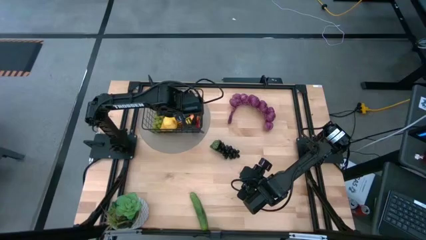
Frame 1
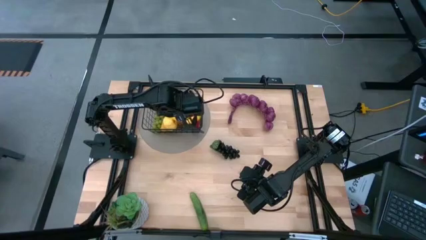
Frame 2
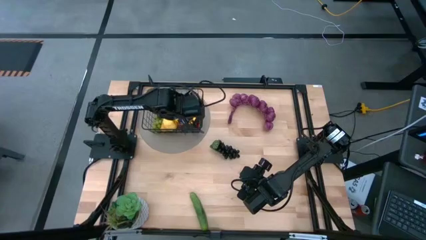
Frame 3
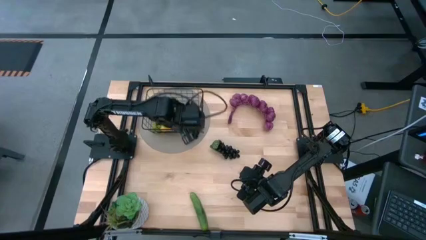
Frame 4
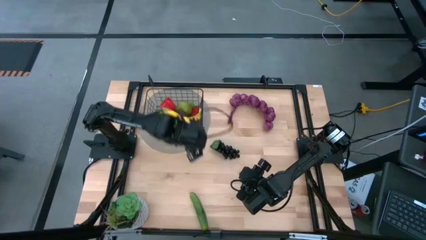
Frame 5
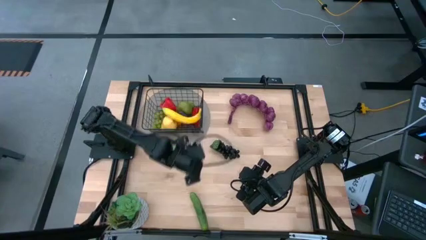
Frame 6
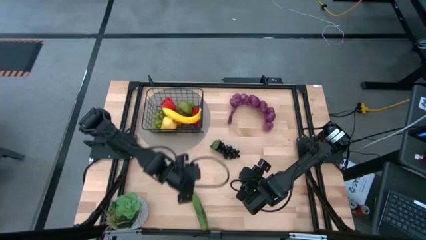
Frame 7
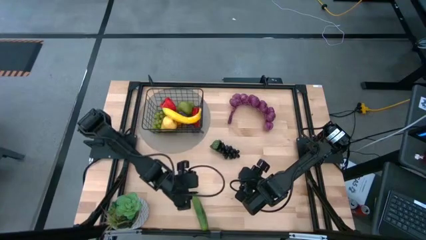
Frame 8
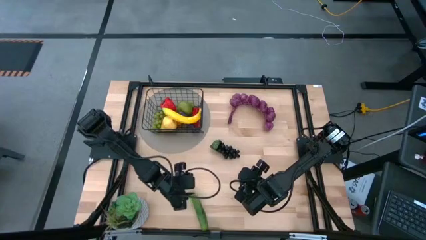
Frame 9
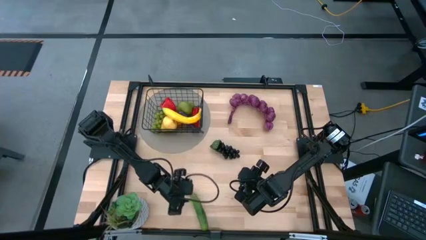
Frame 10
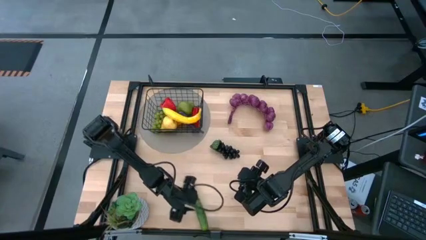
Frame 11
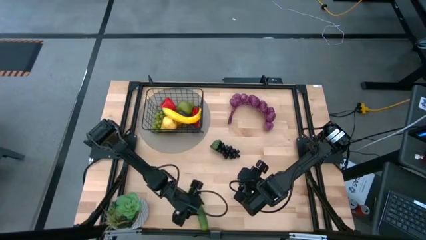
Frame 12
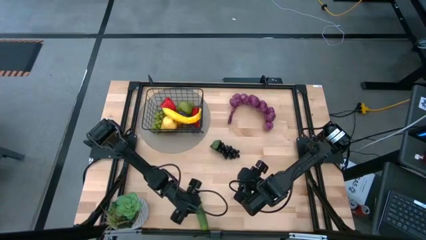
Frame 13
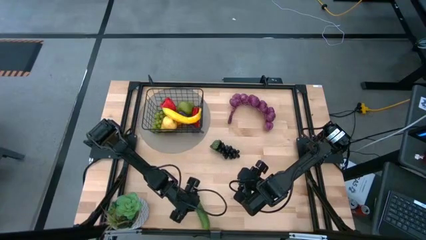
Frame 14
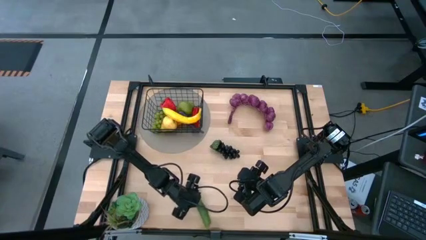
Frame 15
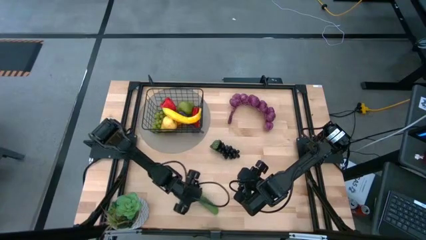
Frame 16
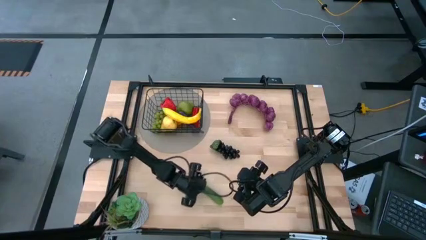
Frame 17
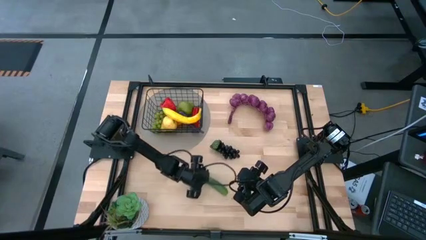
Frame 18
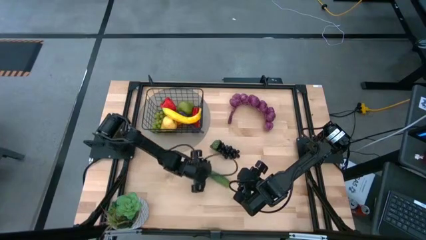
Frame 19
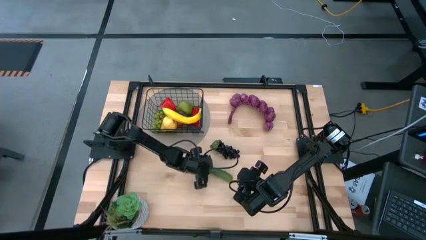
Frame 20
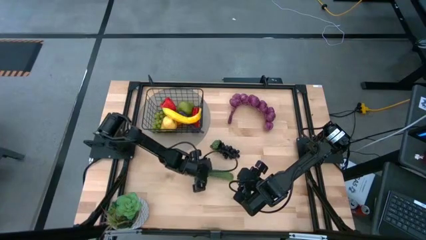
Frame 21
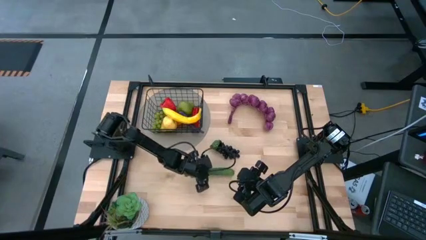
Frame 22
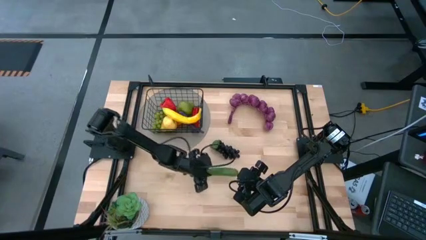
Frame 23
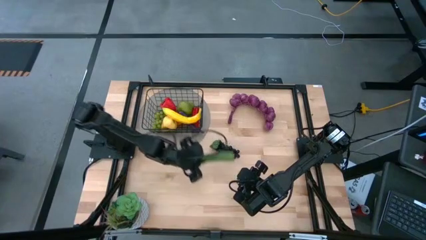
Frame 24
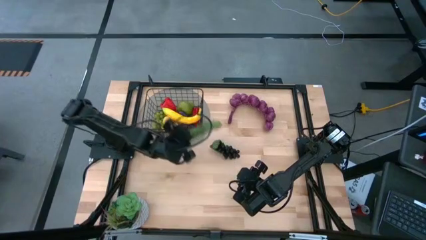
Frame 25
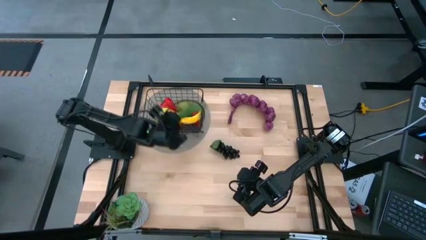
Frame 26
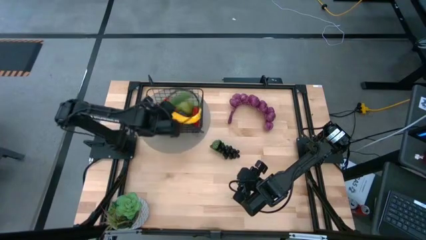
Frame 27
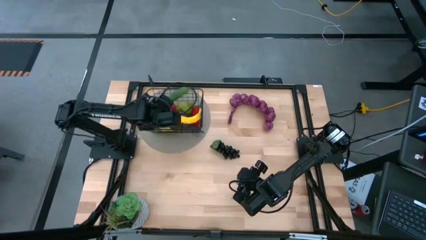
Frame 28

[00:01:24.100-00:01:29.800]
Task: Build produce basket
Put the cucumber into the wire basket

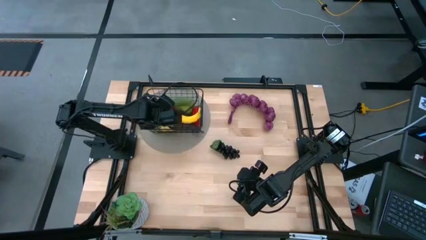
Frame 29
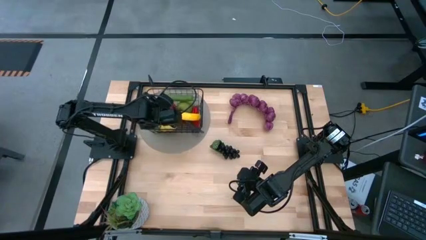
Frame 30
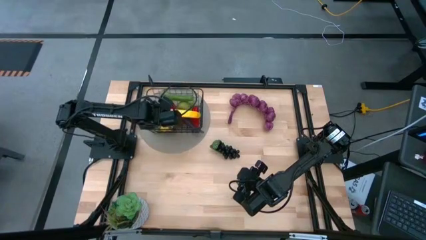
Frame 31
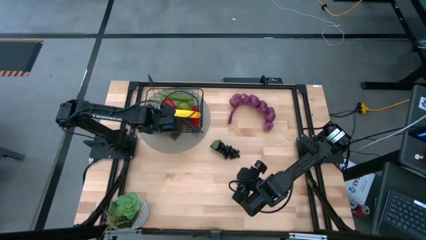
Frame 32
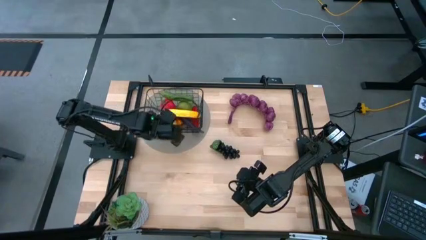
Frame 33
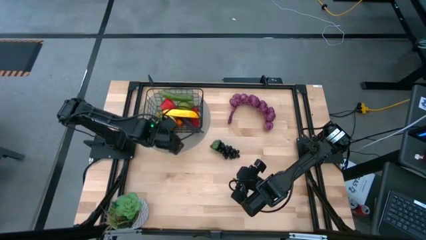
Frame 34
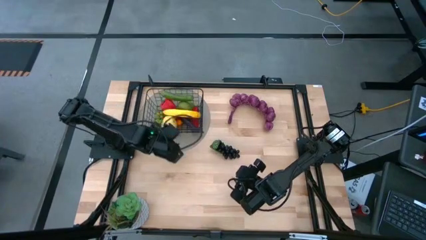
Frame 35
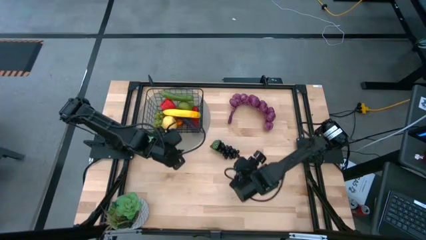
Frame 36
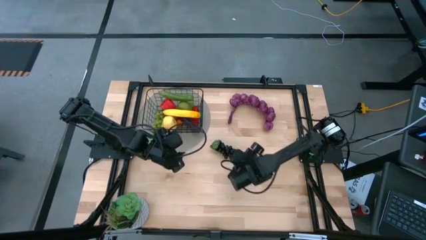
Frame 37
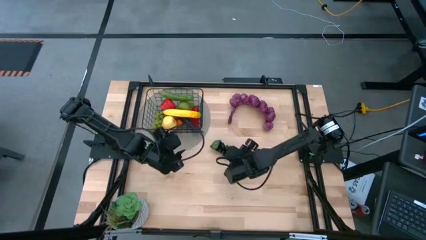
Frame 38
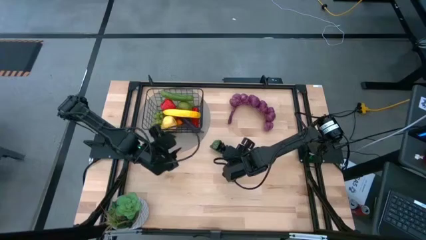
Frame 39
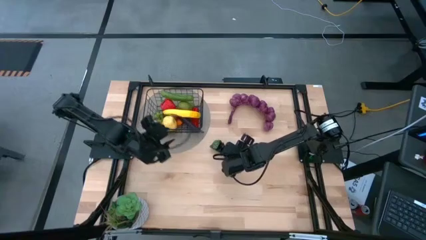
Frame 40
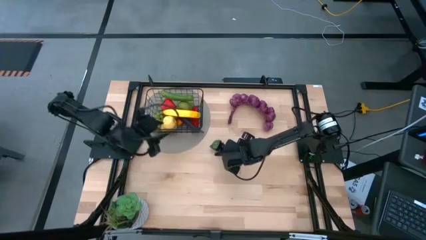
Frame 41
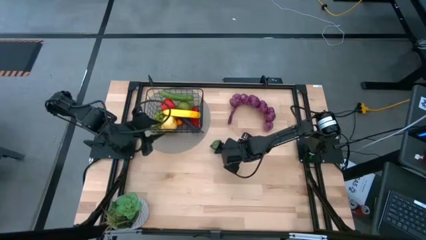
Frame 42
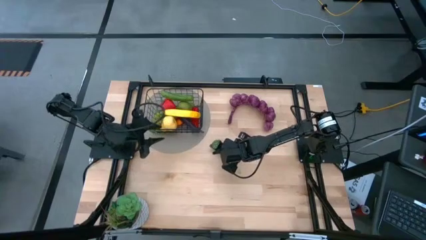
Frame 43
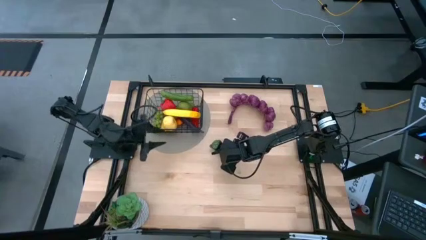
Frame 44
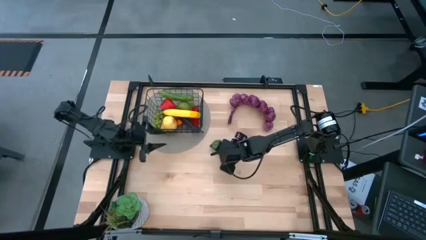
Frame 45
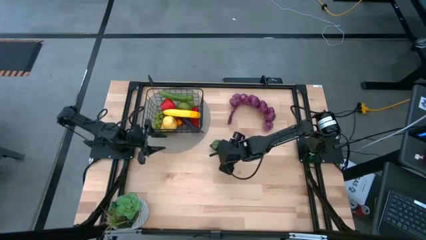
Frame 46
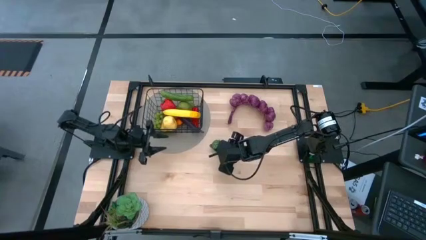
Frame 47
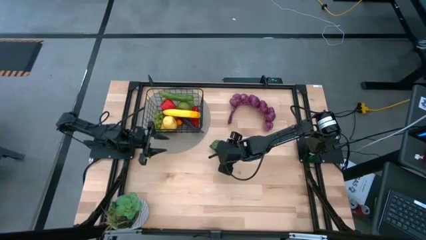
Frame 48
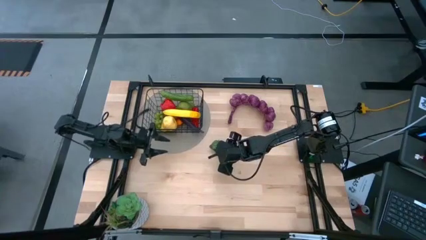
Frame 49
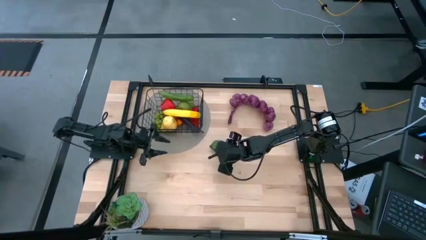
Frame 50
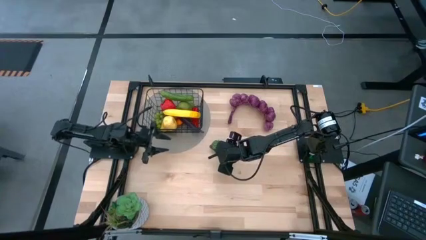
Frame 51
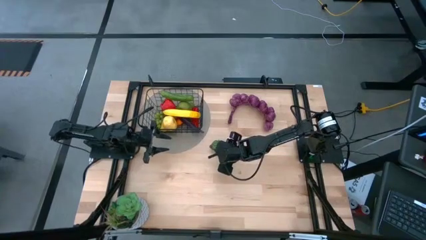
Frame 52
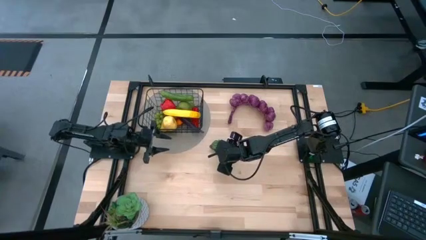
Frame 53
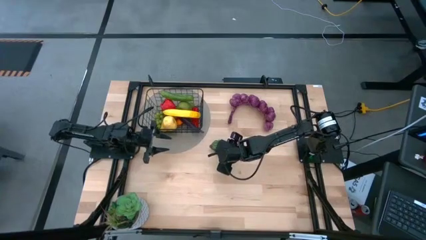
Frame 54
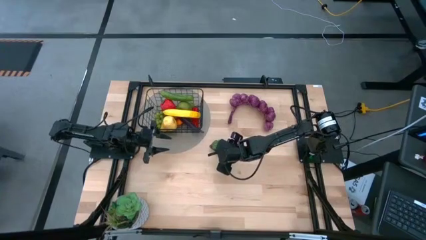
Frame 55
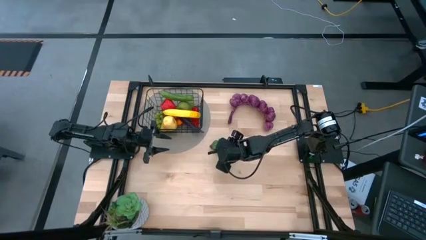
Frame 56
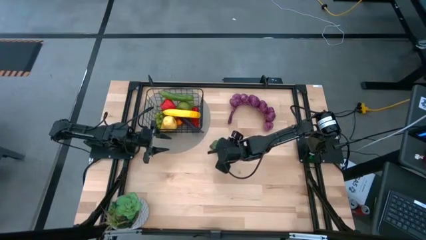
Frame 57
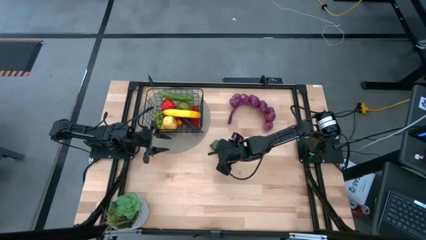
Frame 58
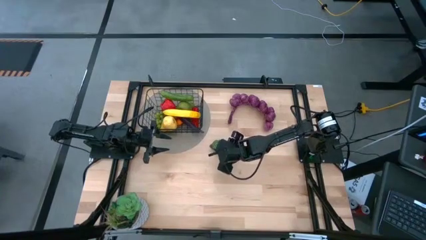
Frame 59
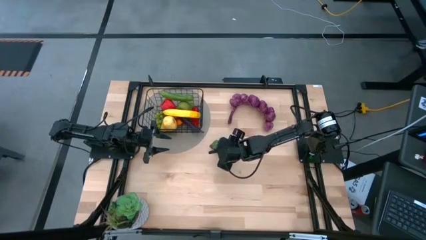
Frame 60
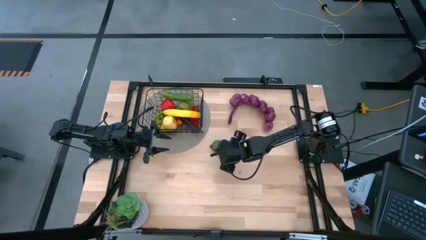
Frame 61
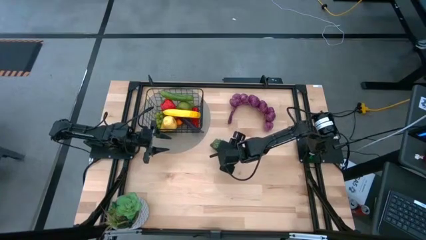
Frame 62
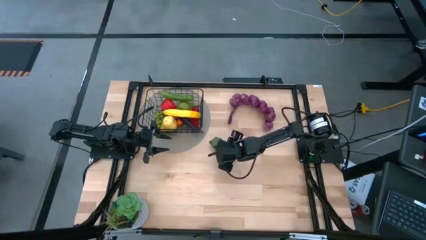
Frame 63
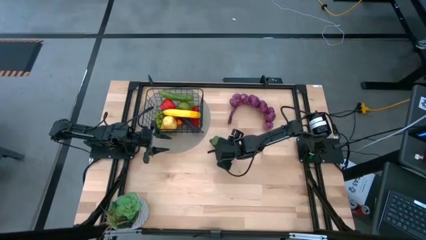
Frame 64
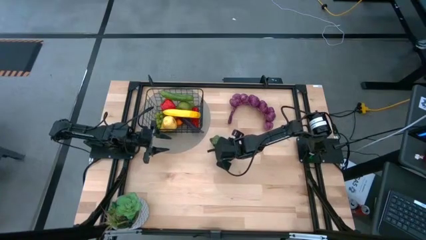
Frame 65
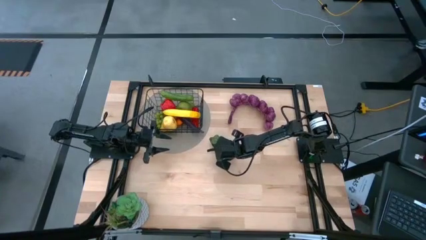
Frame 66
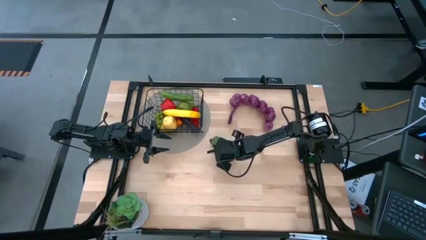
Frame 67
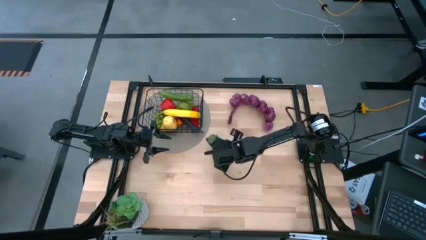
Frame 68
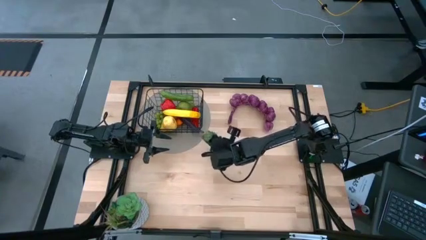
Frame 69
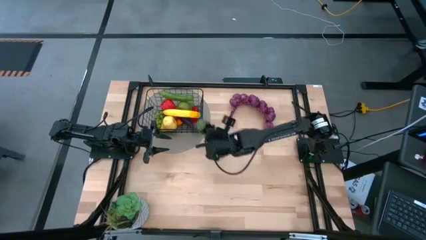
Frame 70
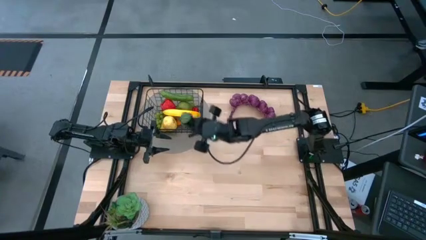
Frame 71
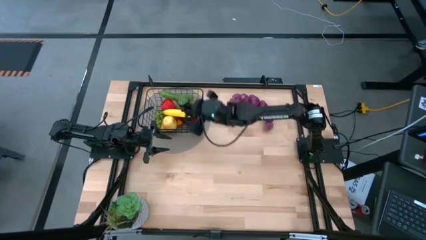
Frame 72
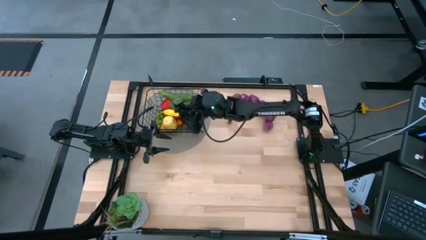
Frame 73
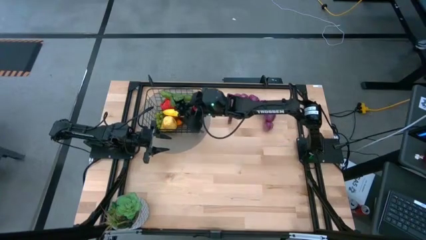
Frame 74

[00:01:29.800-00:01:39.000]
Put the black grapes into the wire basket
